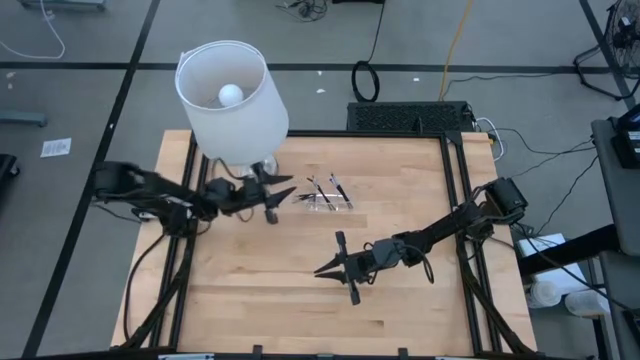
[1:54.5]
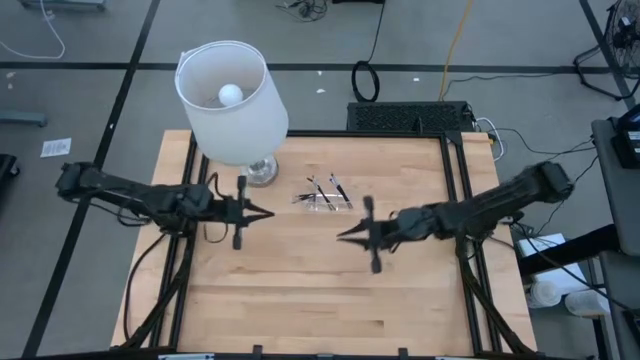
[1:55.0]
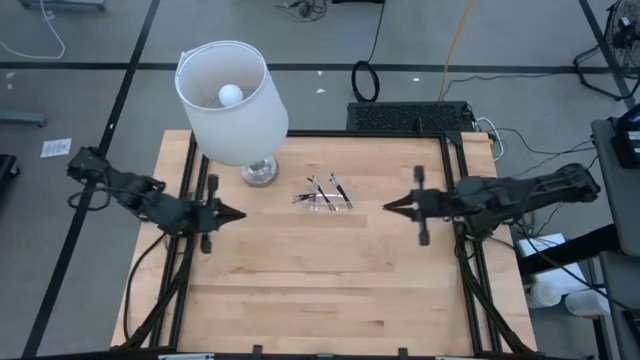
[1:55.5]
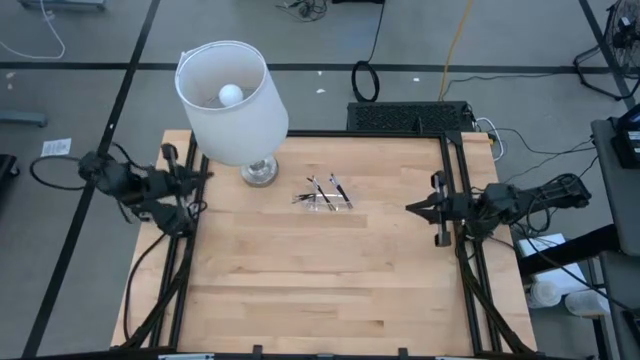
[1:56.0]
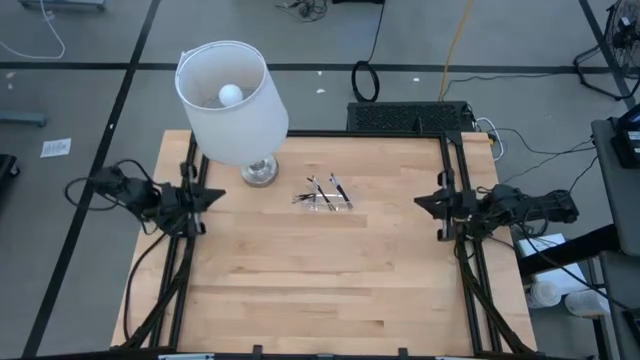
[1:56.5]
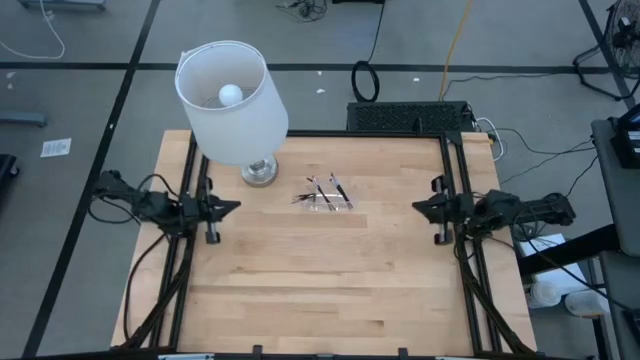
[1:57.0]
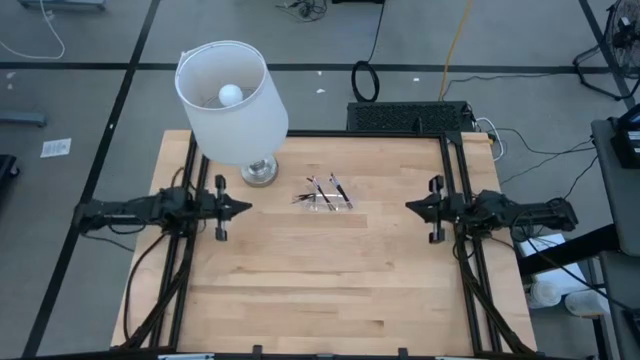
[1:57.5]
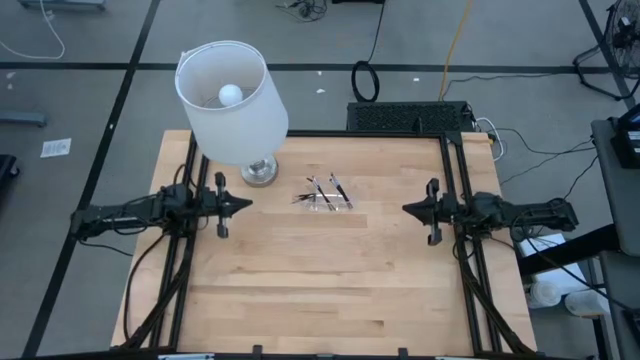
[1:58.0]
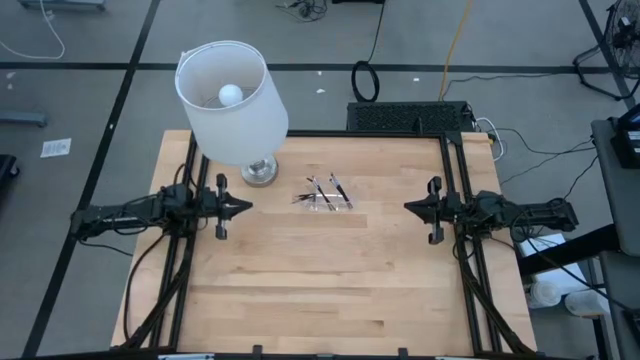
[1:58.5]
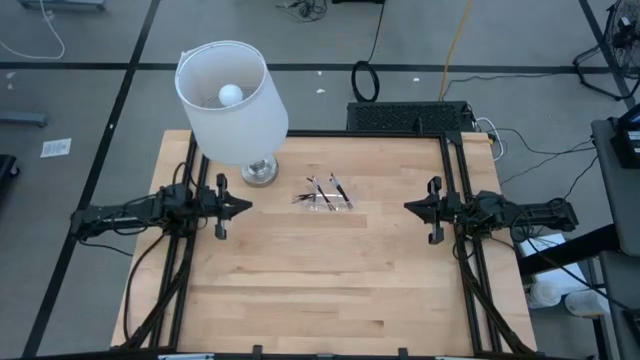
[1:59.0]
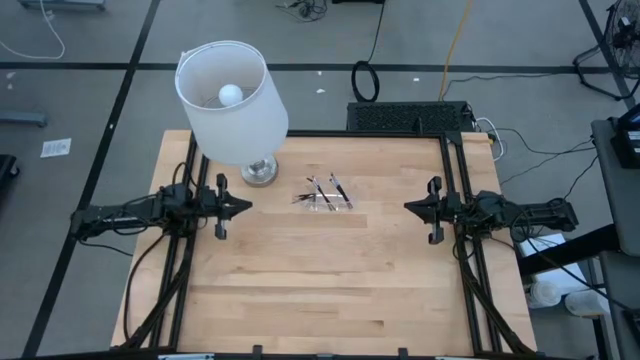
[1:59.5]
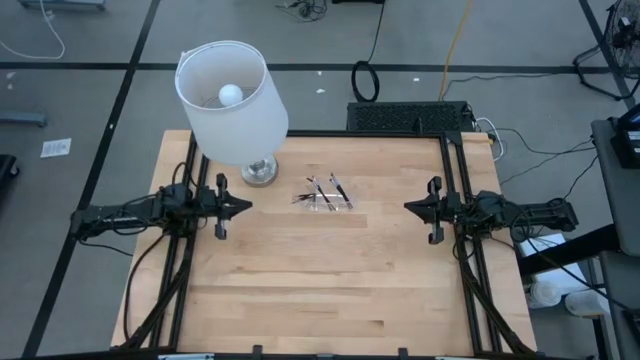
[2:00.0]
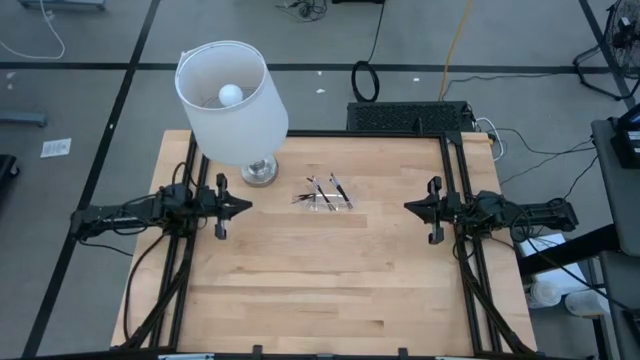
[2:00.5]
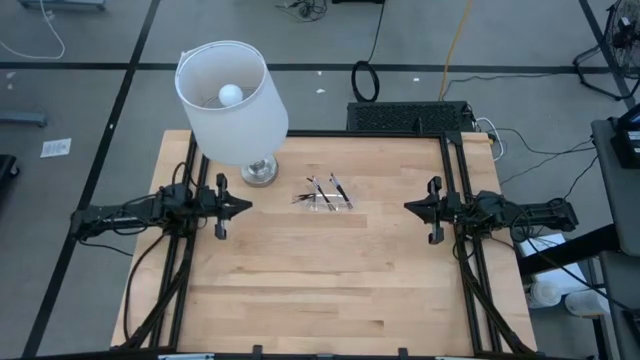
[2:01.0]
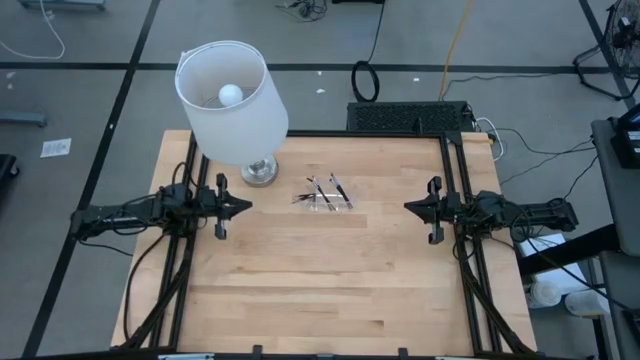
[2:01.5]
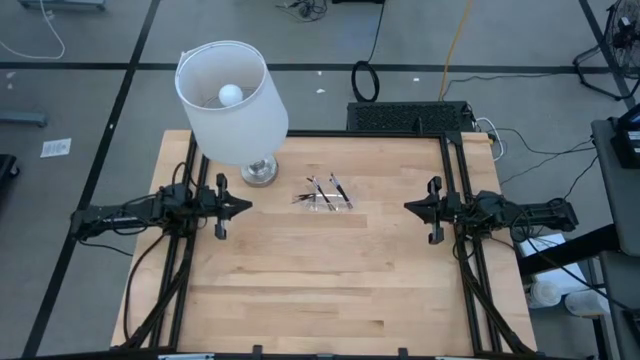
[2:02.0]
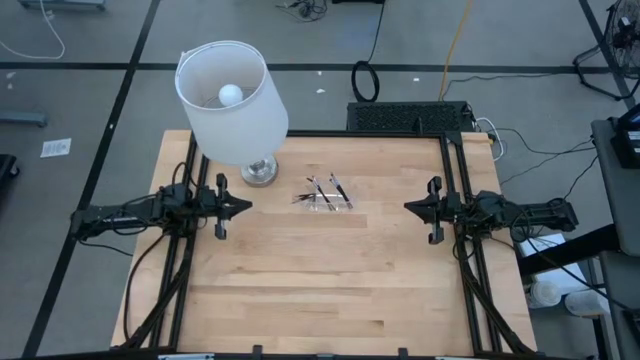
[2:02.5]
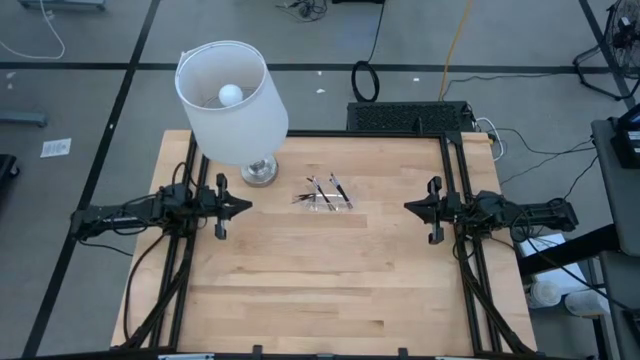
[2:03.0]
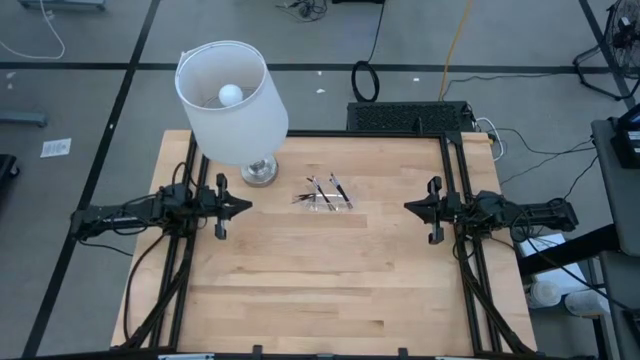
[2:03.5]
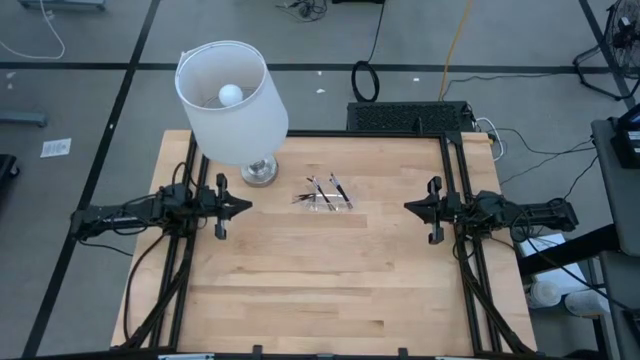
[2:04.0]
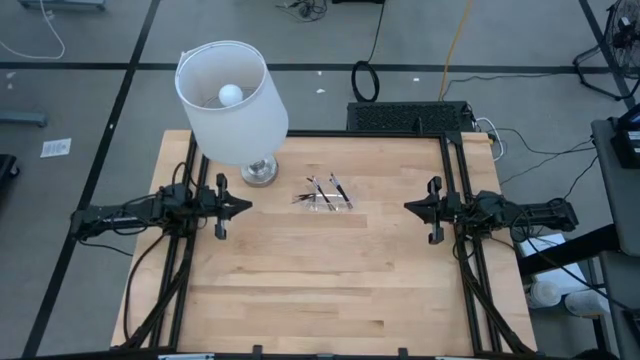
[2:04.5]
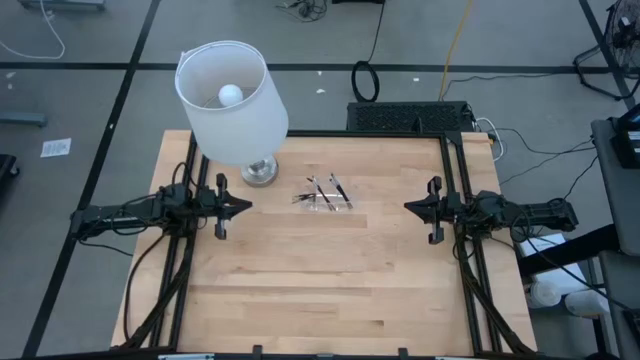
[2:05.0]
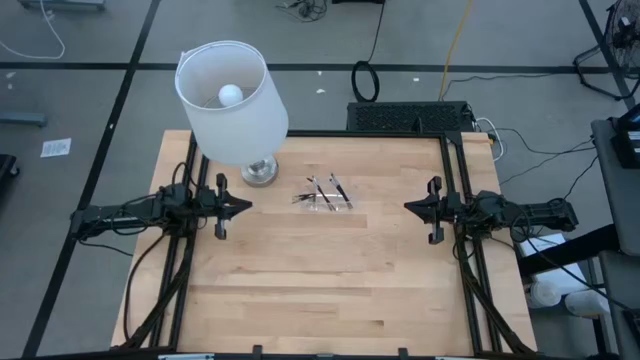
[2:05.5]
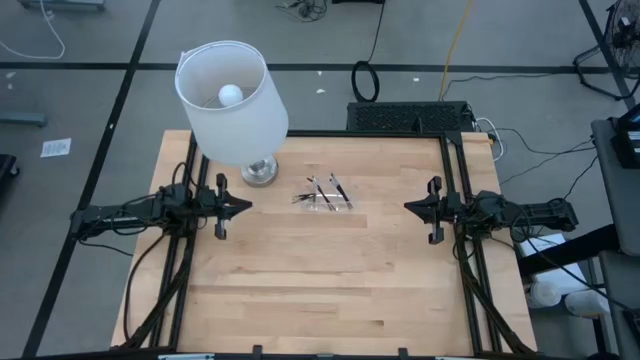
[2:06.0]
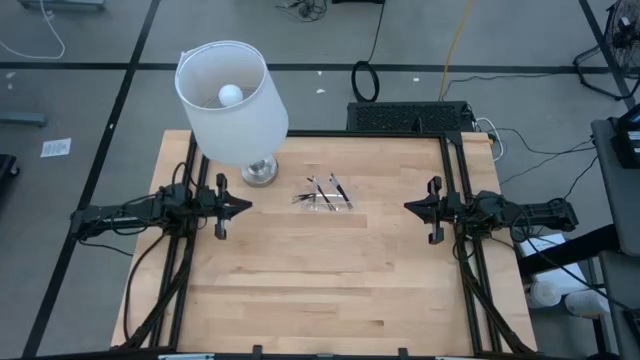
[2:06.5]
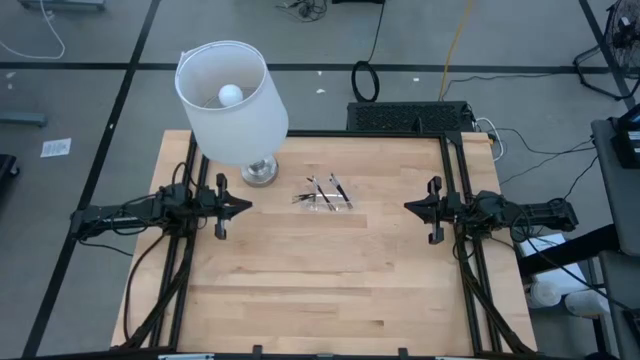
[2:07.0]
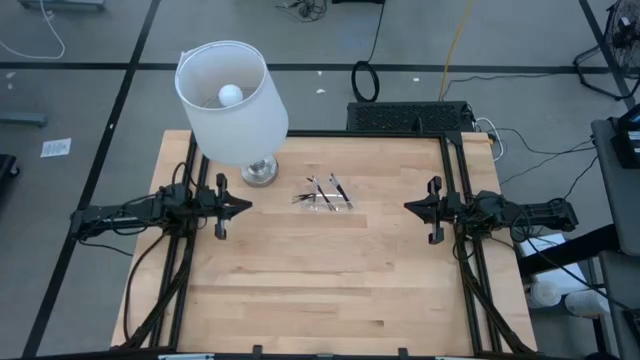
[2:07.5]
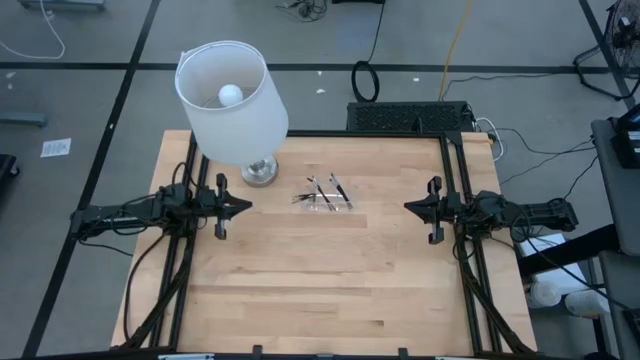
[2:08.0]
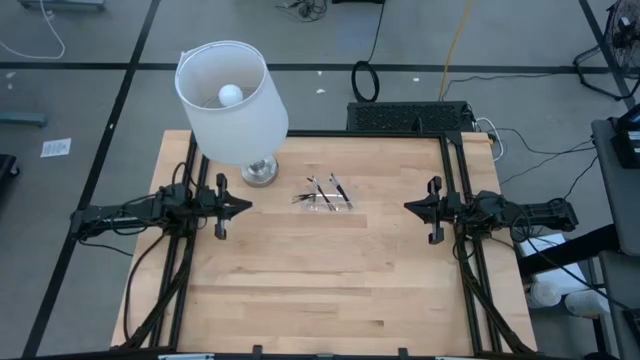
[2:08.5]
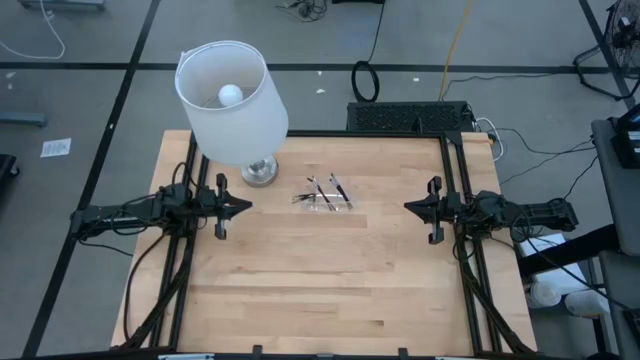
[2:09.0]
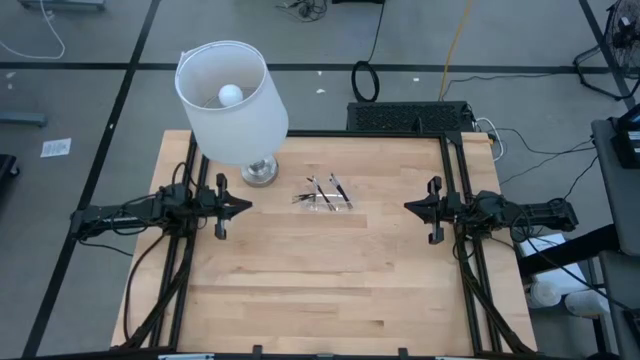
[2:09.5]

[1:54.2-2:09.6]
Task: Put items in baskets/containers
Return to Home Position

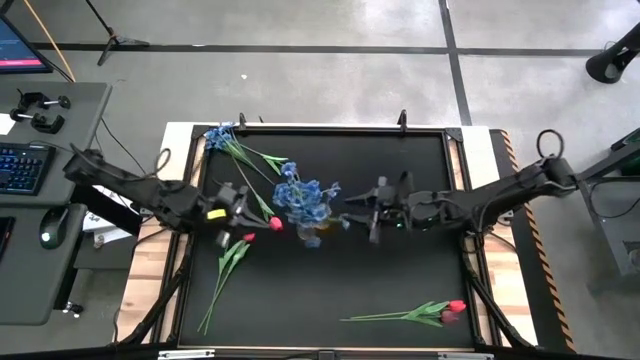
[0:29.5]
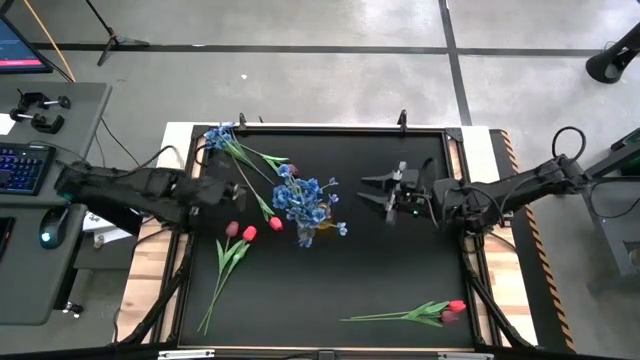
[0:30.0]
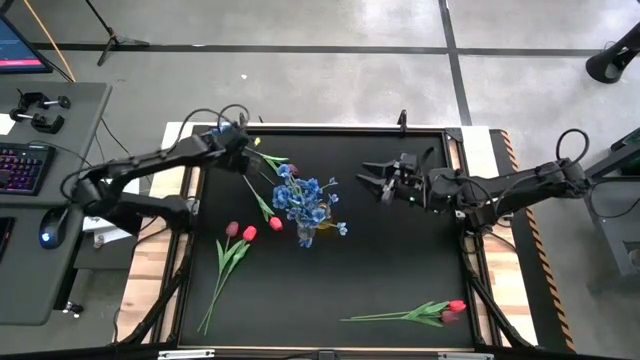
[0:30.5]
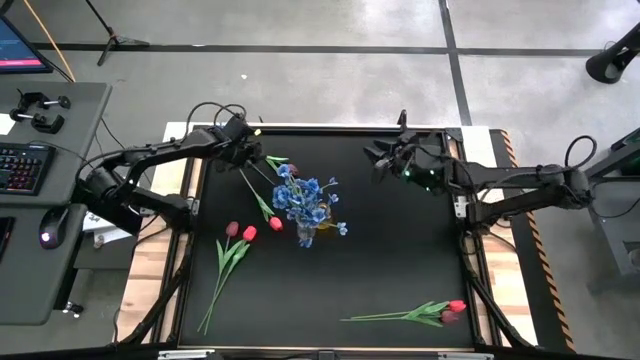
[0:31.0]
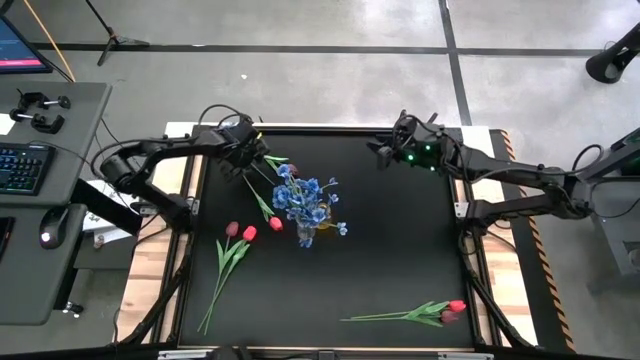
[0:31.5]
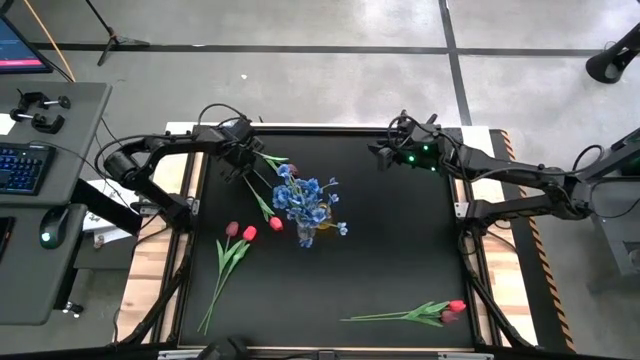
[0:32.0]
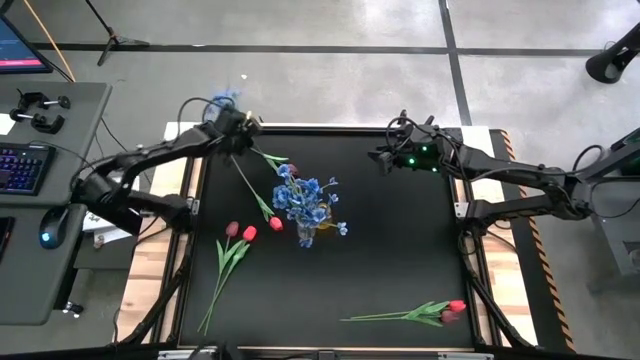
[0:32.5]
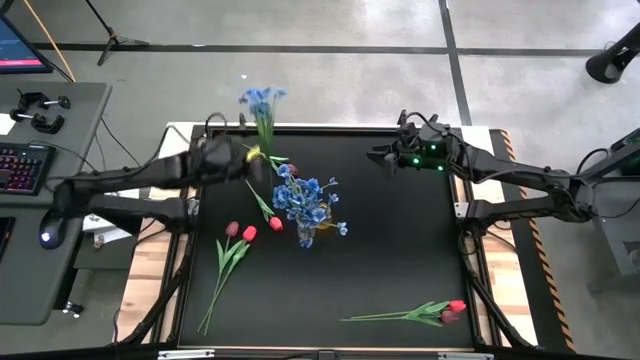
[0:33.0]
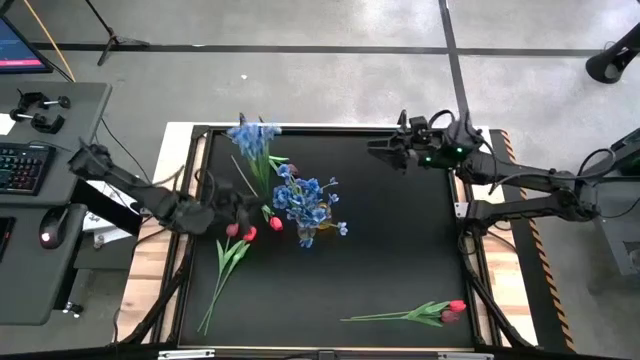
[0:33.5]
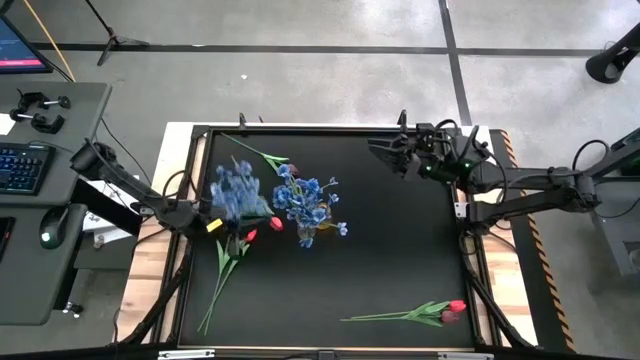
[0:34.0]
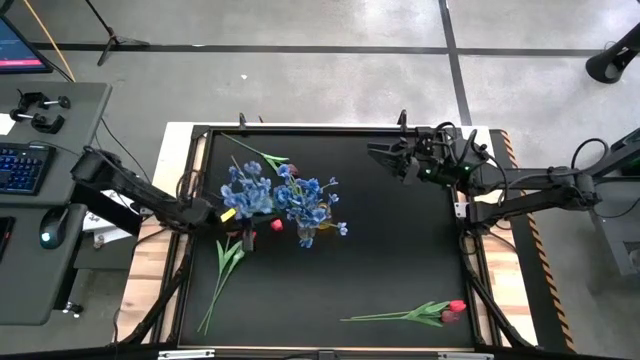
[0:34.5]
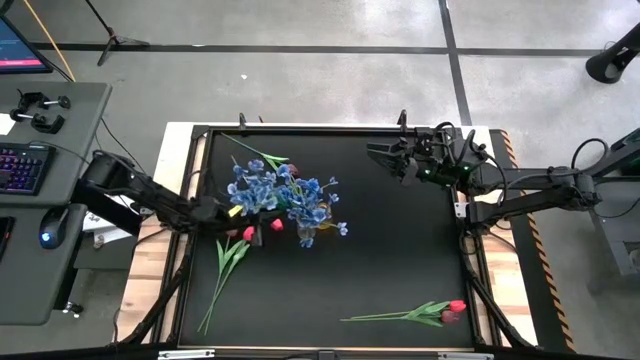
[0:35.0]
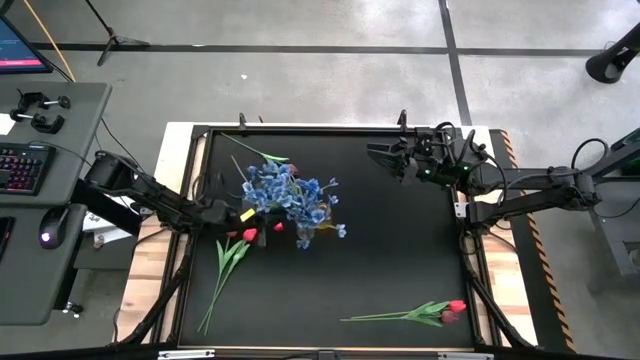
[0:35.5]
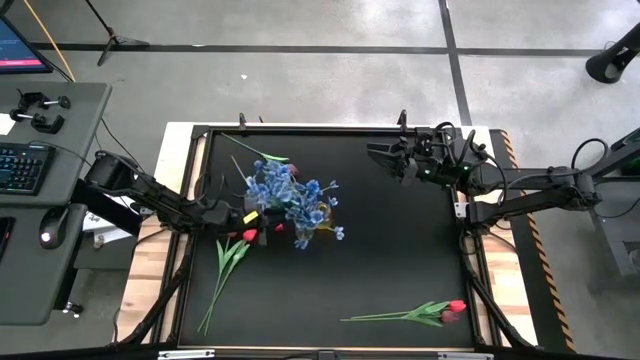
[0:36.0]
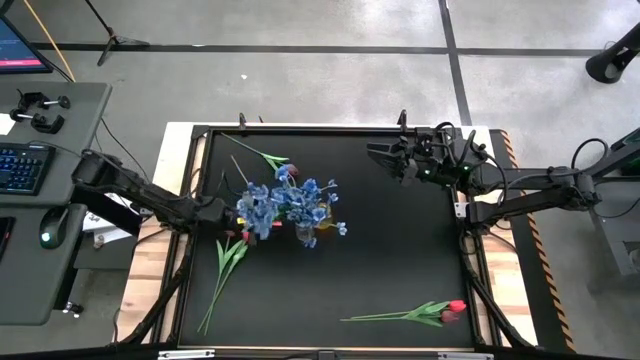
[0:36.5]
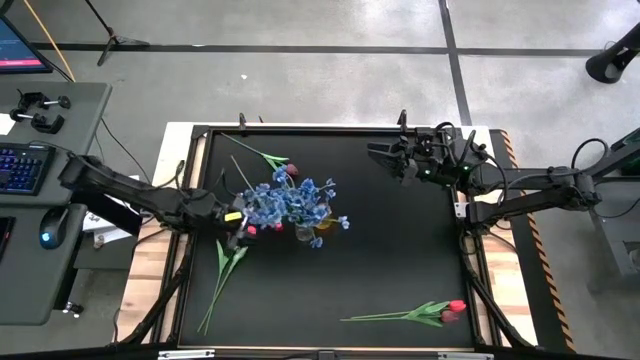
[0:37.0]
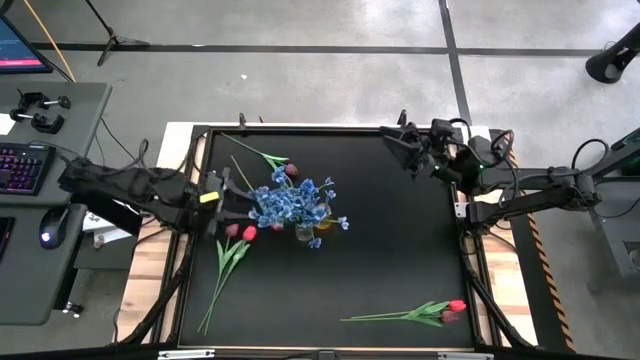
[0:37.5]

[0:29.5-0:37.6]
Task: Sort flowers into vase by color
Put the blue flower into the transparent vase
